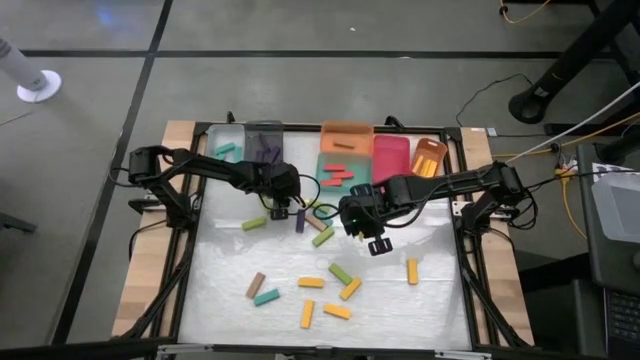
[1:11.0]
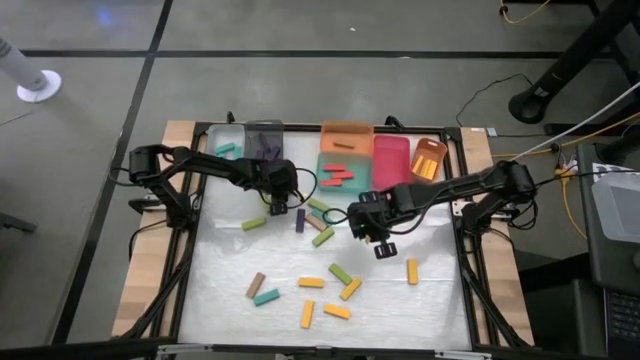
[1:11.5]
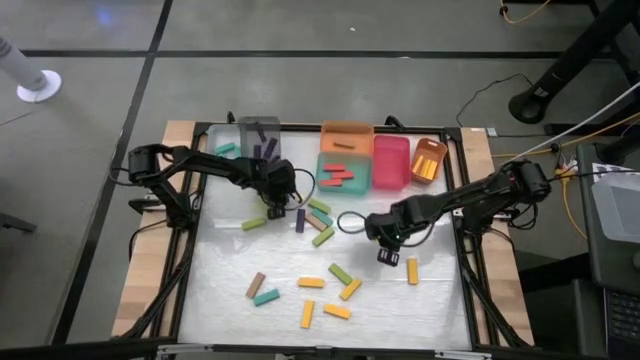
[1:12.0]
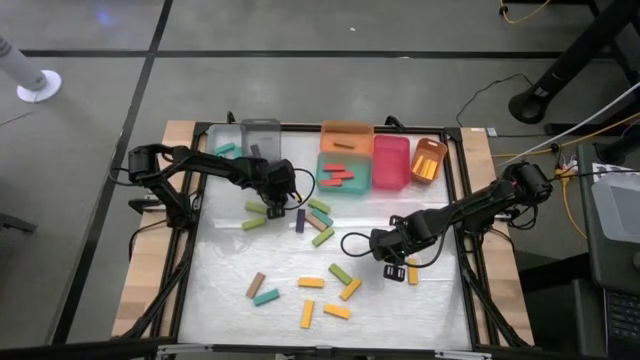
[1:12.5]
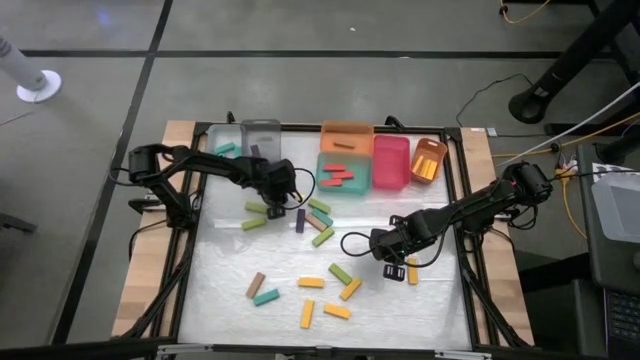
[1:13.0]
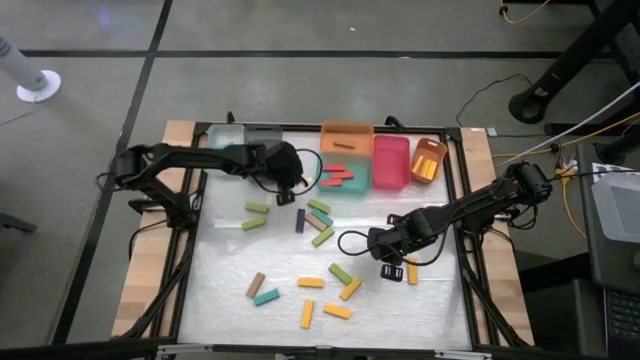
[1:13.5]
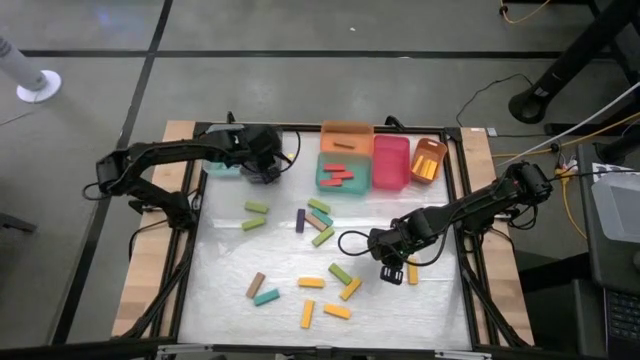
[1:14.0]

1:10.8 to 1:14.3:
Task: Sort blocks
Put the violet block into the black bin

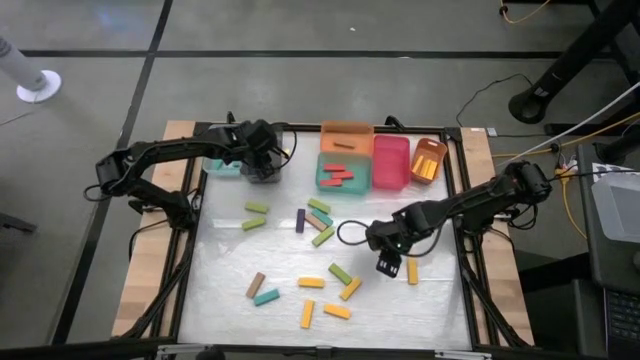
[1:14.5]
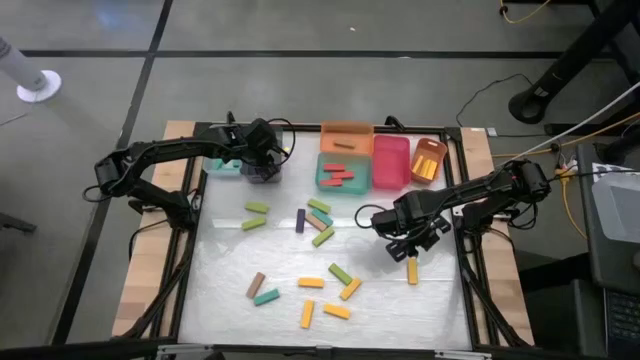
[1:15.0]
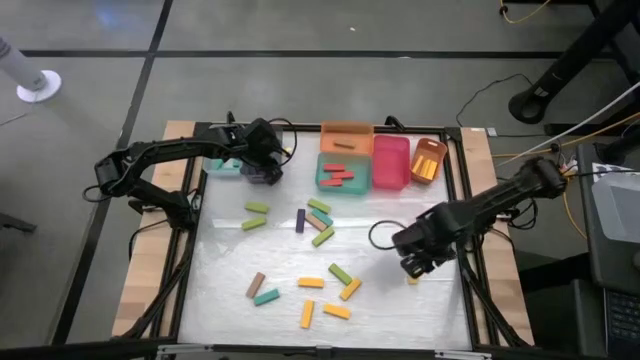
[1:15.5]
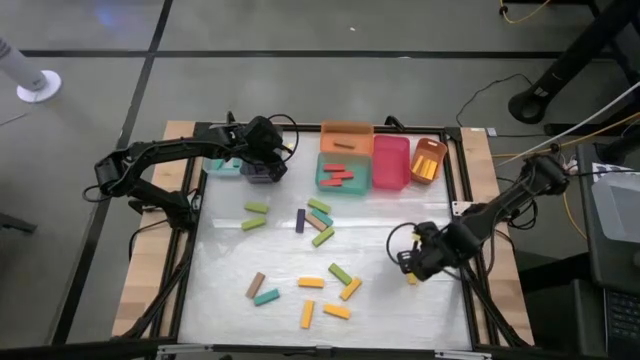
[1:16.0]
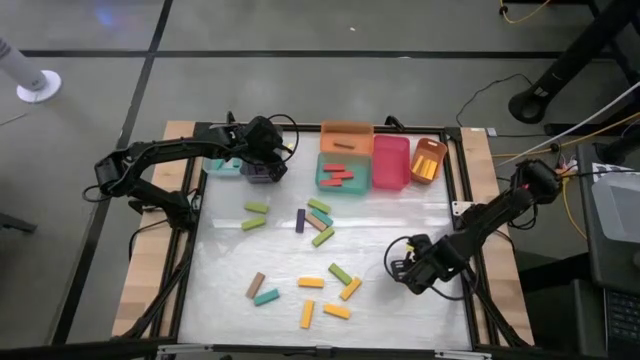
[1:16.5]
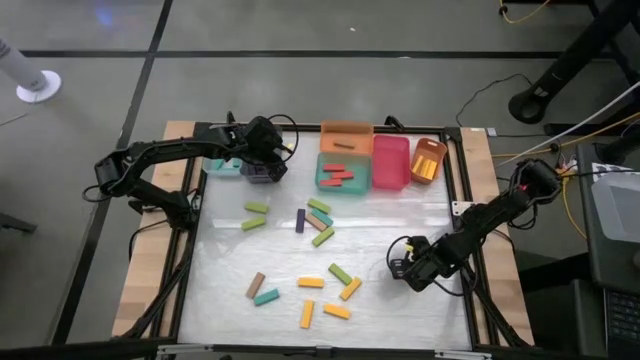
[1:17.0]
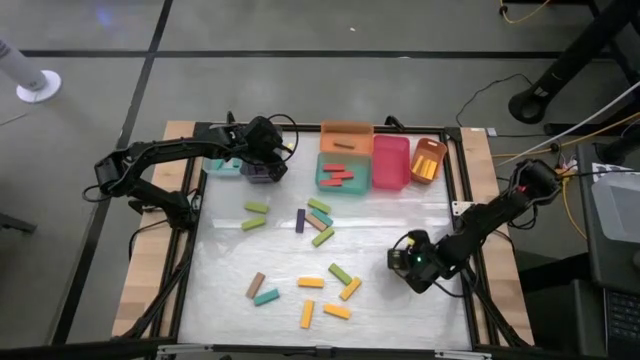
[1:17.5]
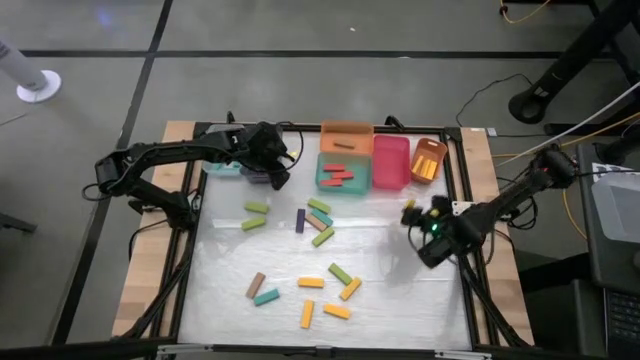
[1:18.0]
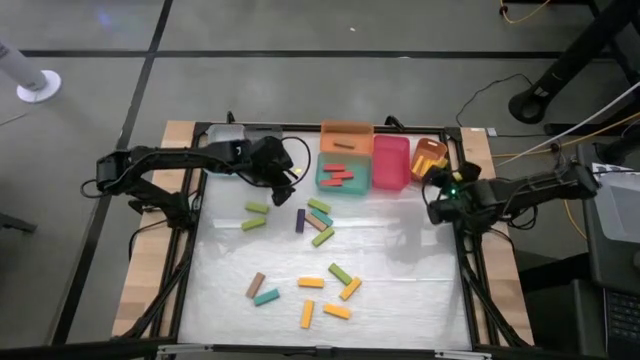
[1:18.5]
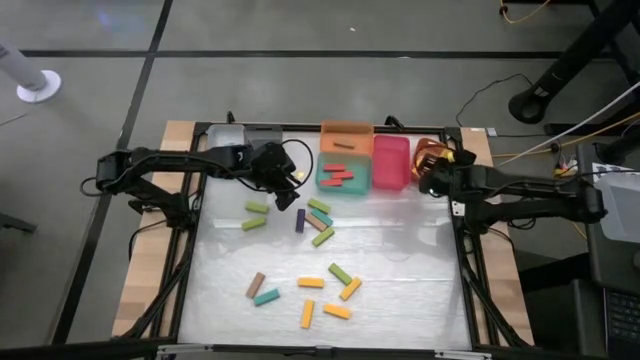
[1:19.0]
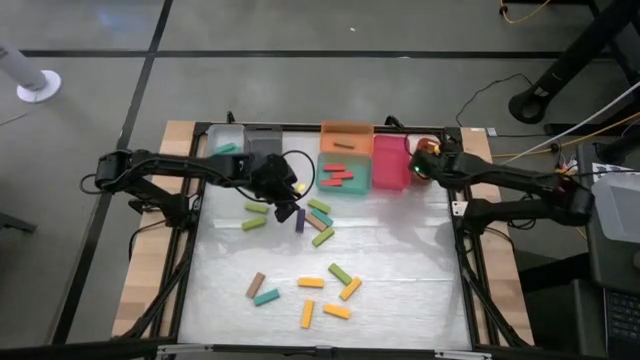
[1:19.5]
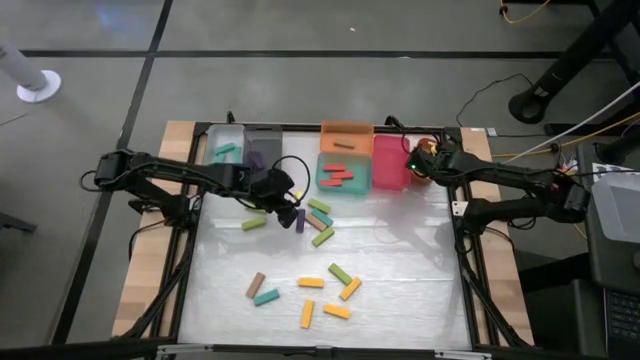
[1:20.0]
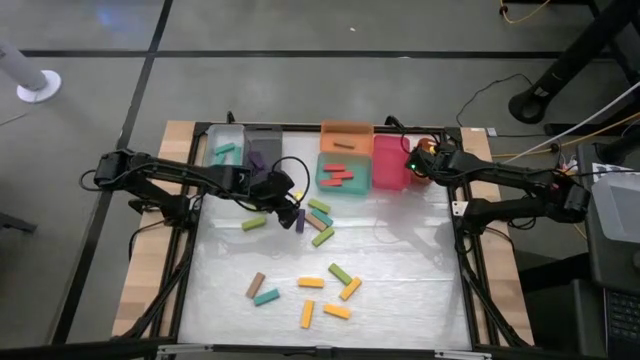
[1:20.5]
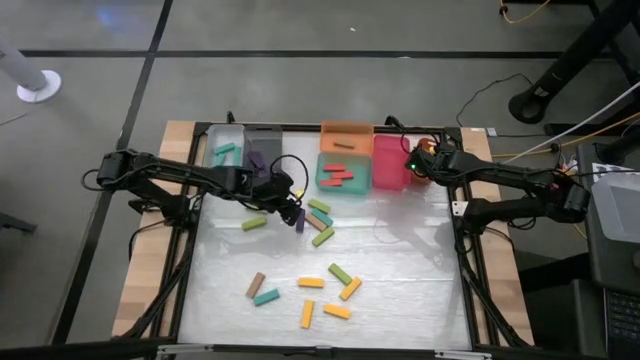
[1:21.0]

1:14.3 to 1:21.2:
Put the yellow block into the right orange bin

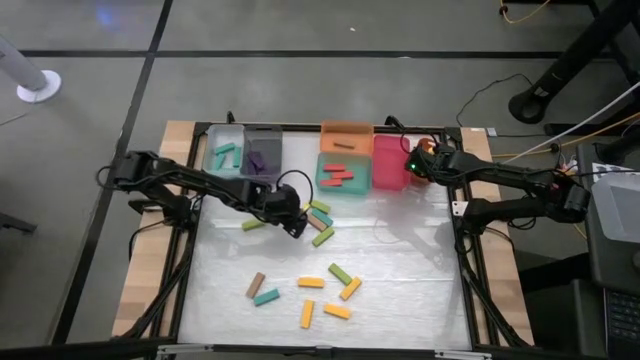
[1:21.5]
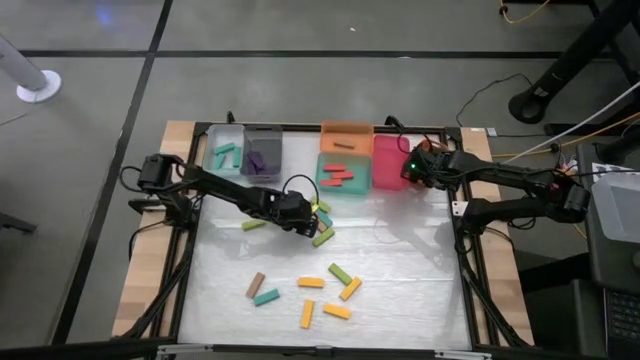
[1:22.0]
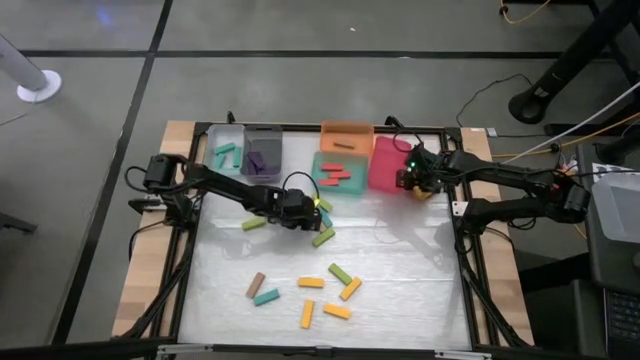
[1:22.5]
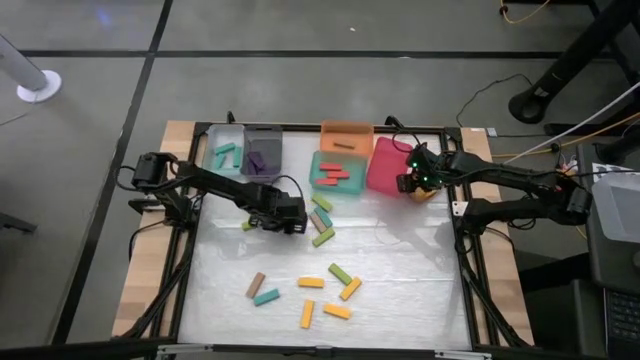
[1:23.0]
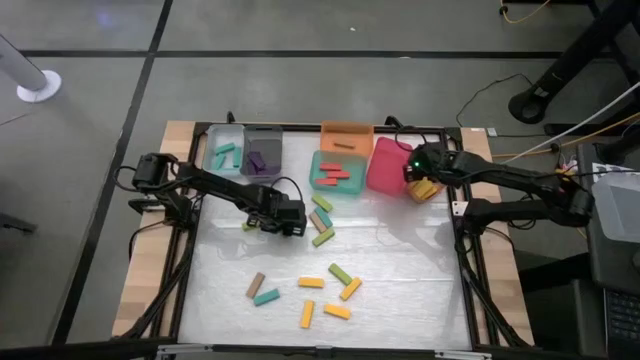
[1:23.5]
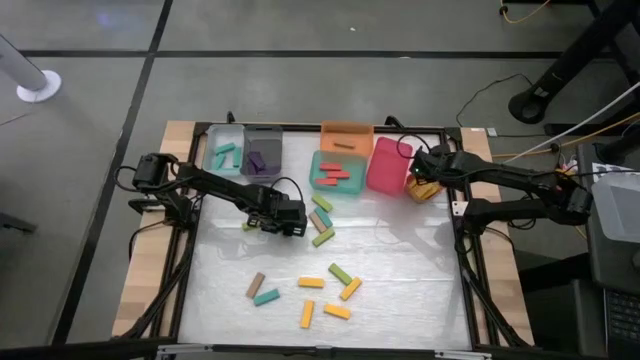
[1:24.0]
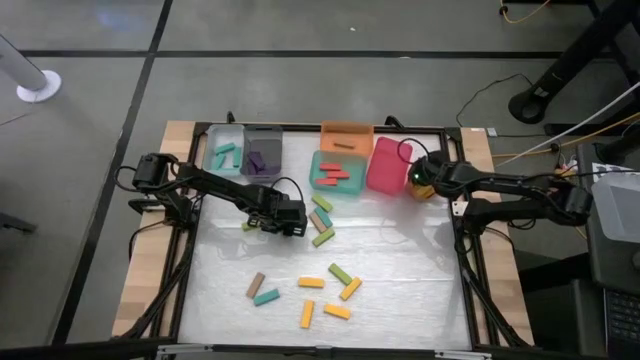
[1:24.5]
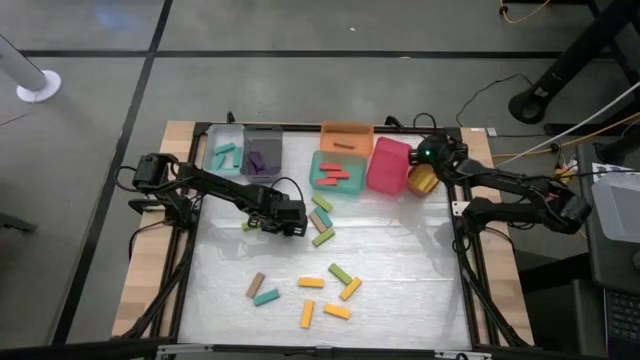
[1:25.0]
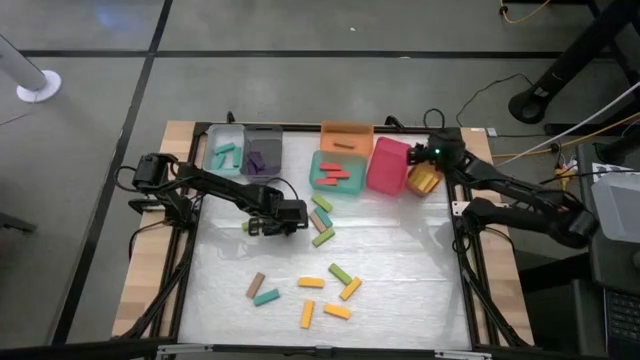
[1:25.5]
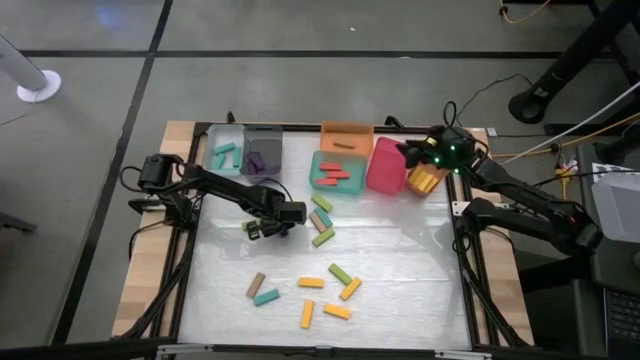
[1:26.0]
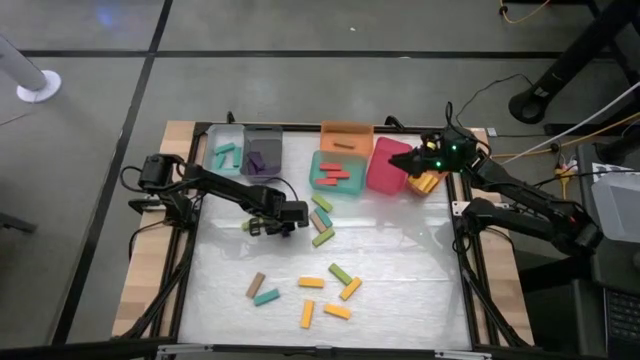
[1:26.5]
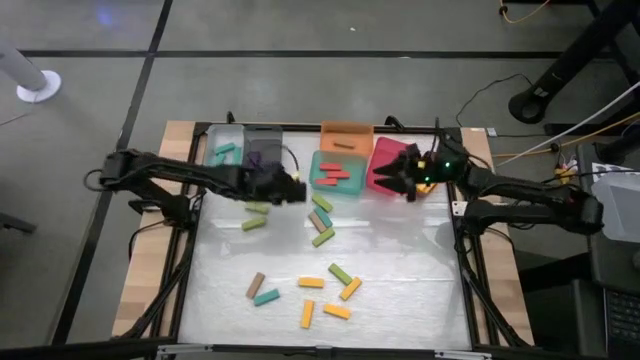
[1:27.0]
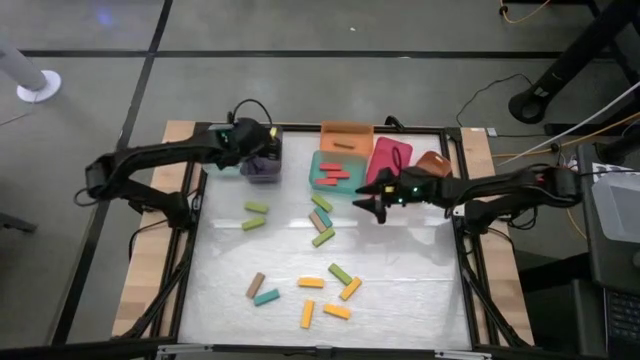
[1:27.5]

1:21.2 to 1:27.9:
Put the violet block into the black bin

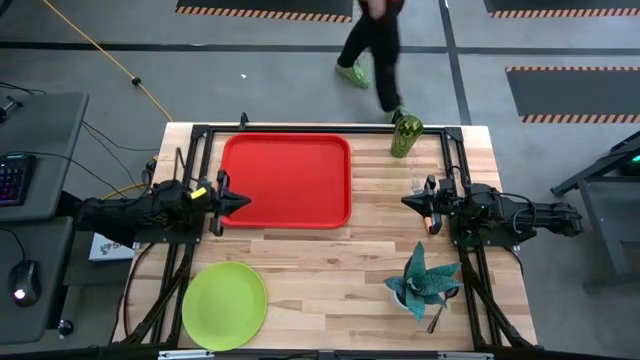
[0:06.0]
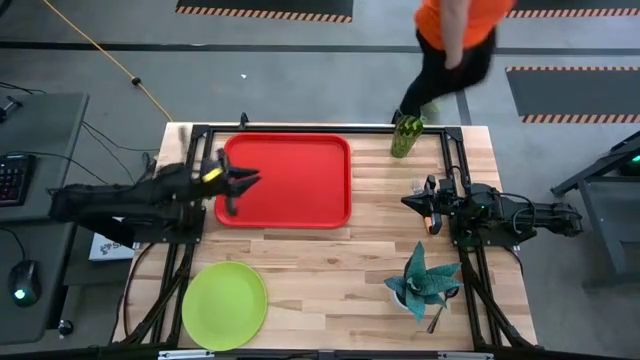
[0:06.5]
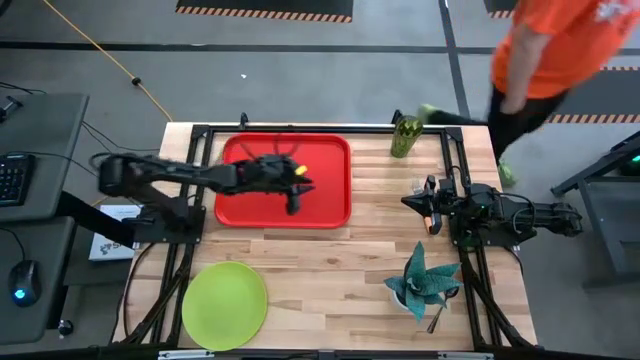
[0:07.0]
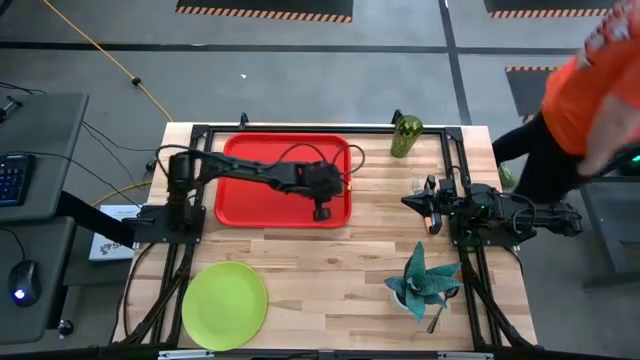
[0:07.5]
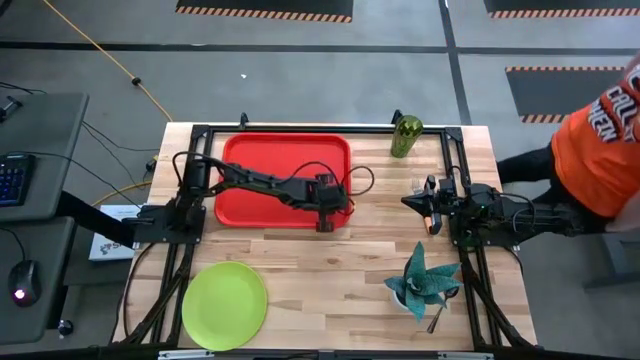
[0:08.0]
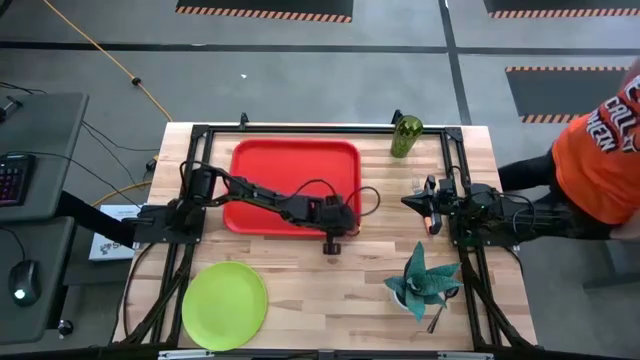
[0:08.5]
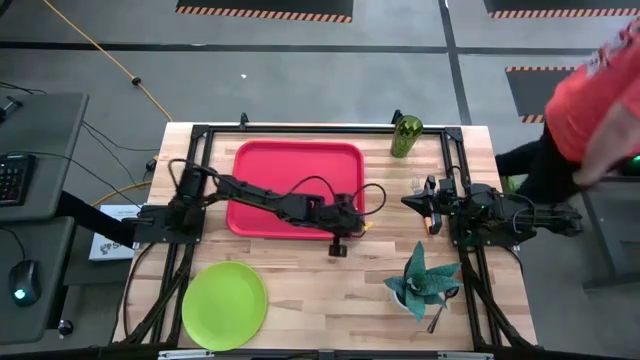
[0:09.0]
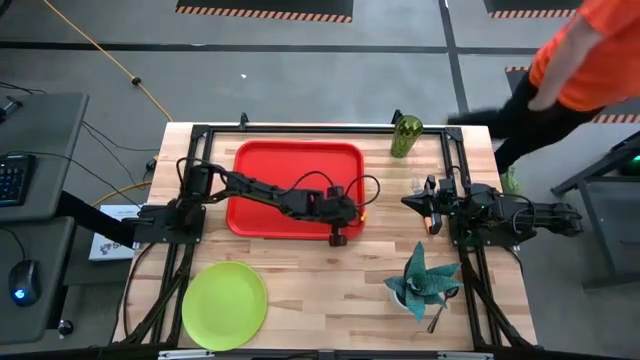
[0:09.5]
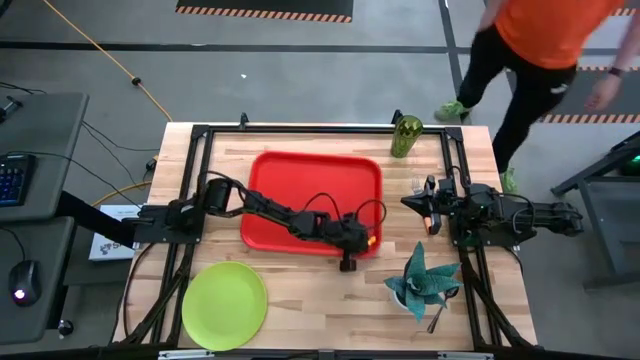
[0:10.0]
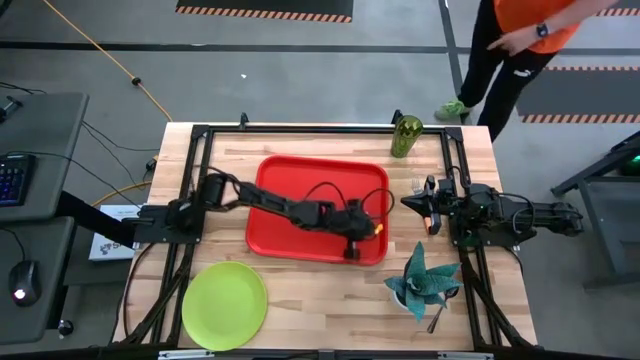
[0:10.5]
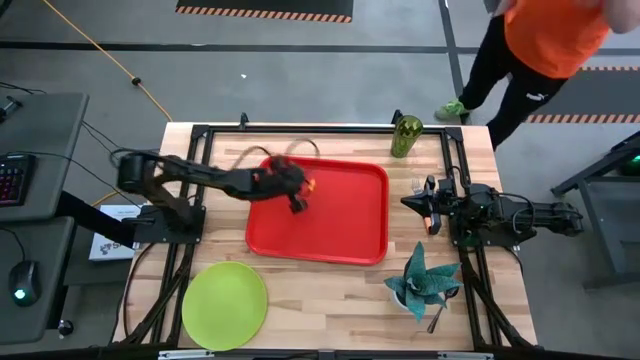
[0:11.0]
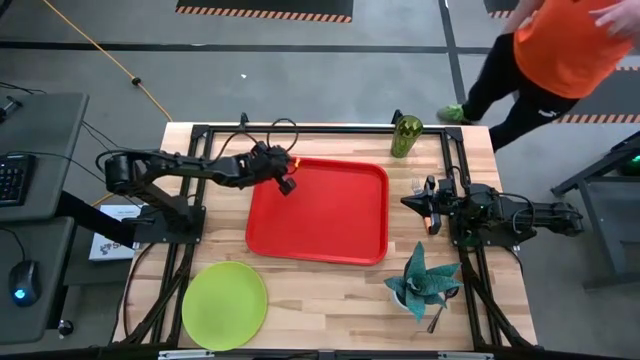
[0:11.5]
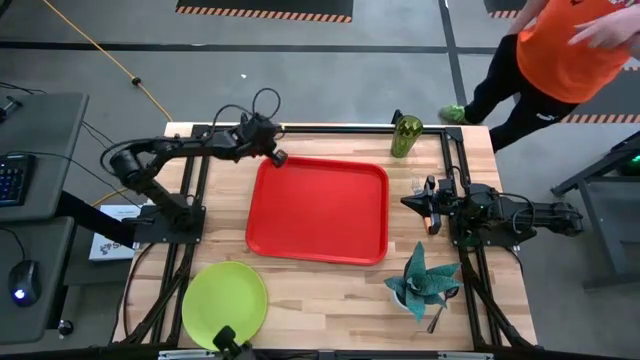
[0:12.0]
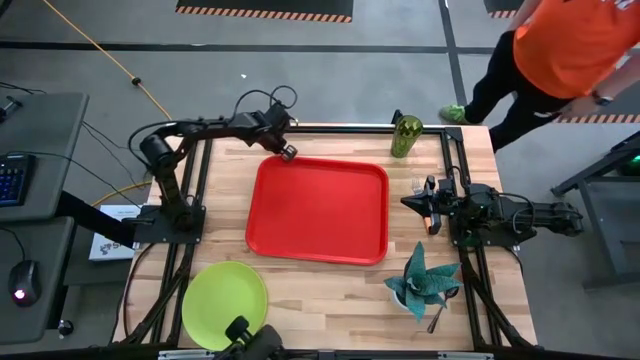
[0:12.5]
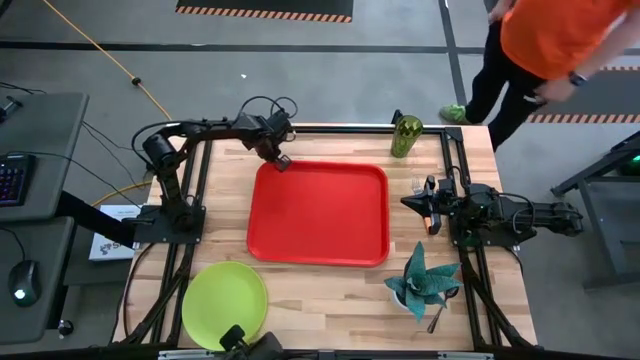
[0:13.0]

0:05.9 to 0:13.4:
Task: Pick and place plate/cup/fork/spoon on tray
Move the red serving tray to the center of the table
